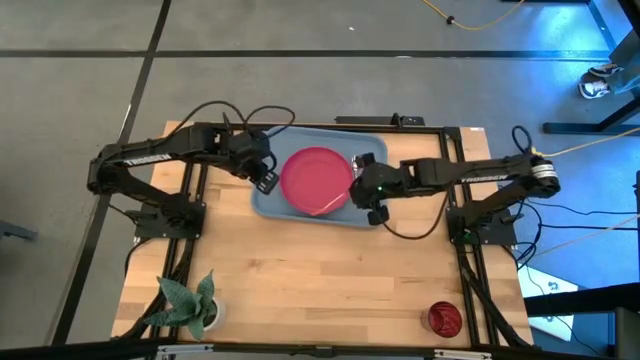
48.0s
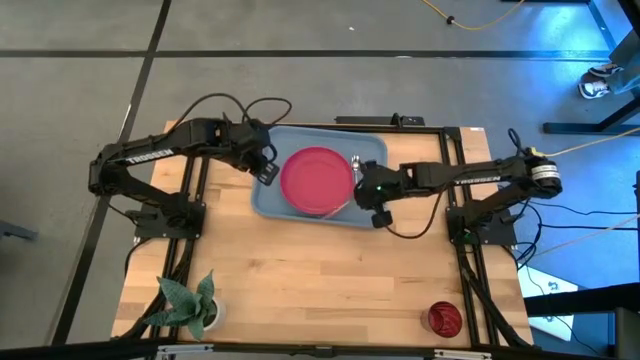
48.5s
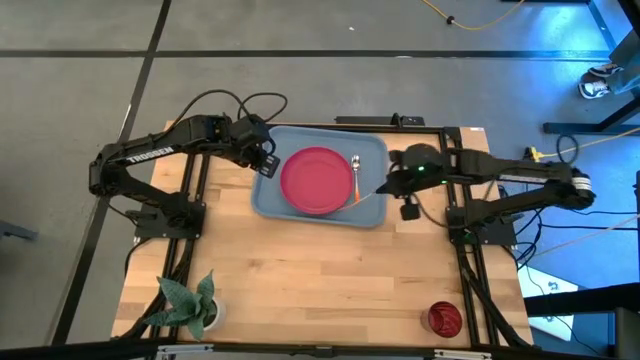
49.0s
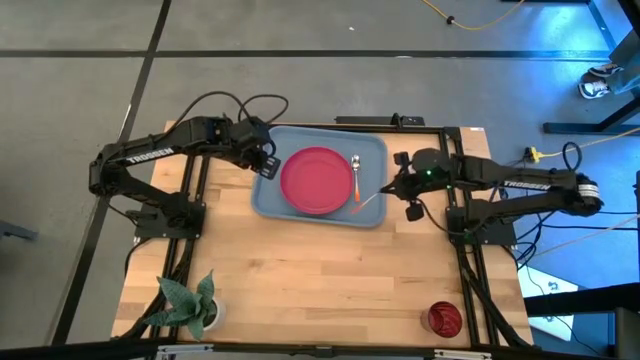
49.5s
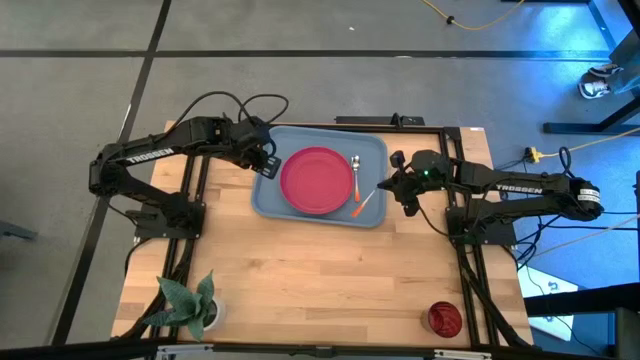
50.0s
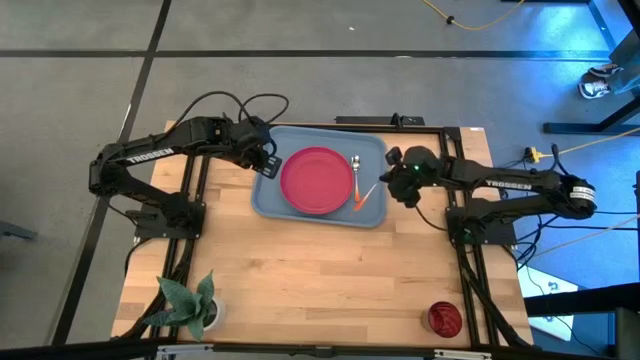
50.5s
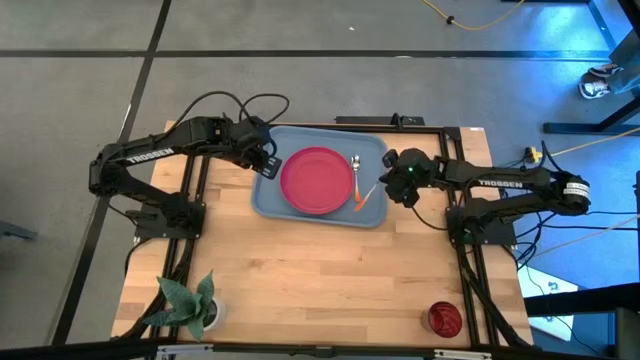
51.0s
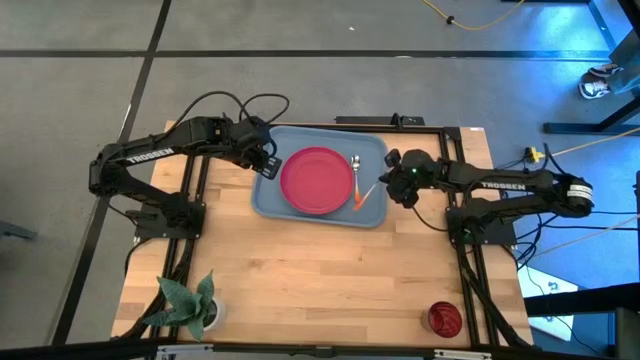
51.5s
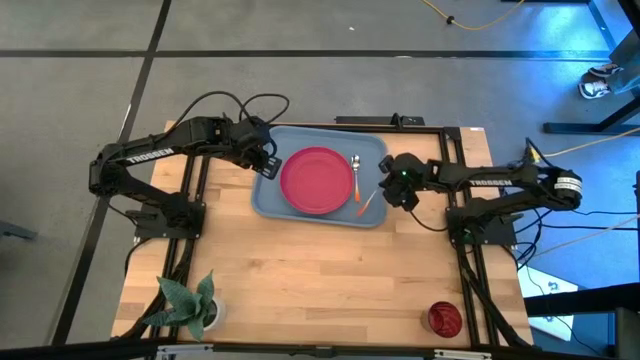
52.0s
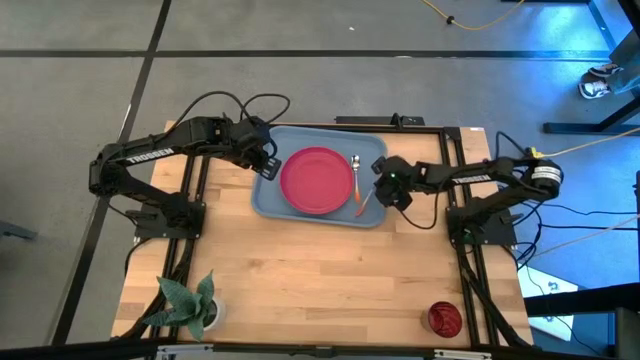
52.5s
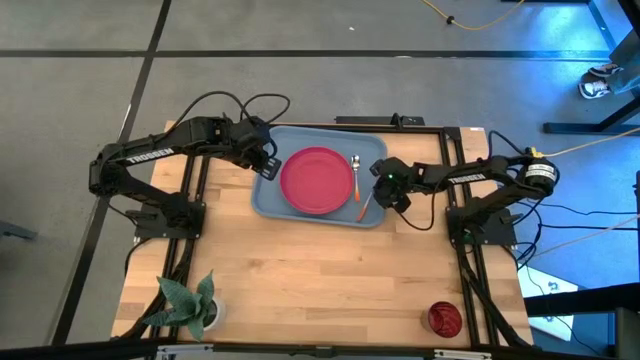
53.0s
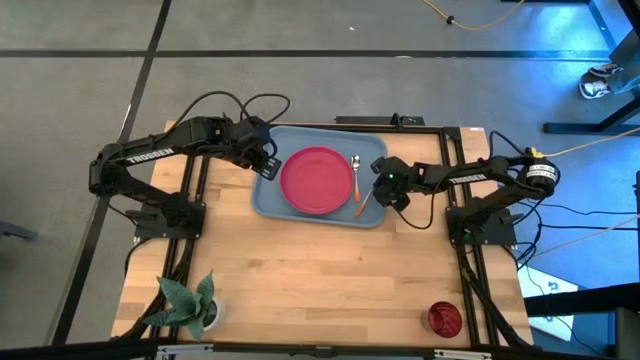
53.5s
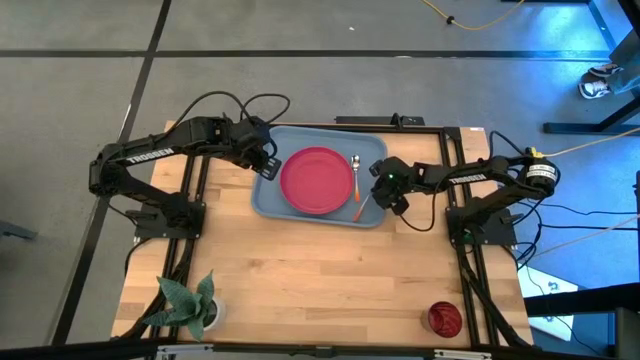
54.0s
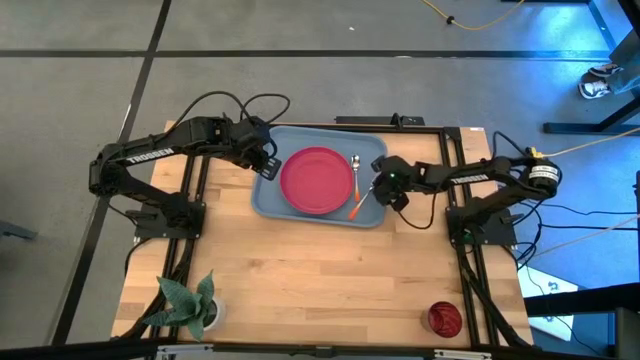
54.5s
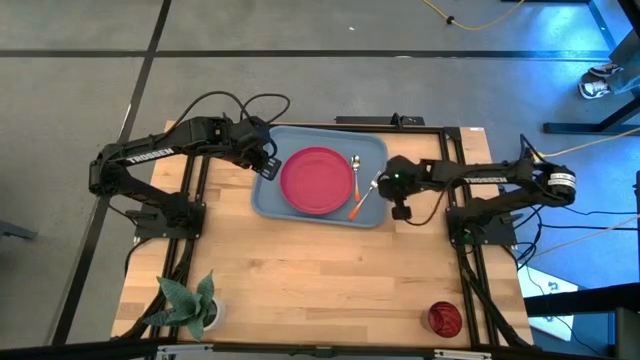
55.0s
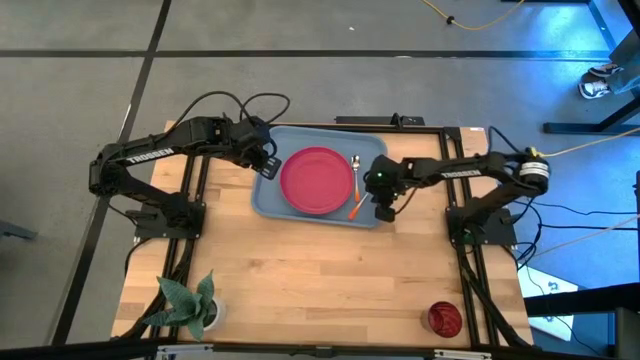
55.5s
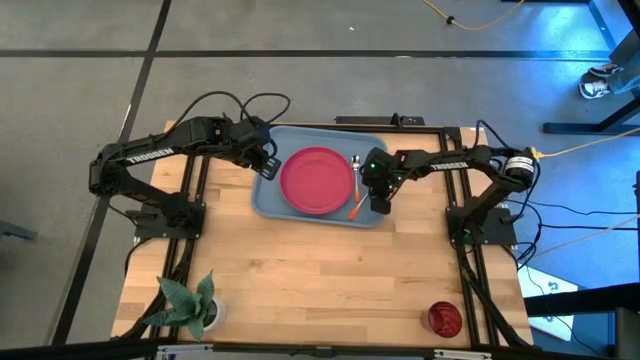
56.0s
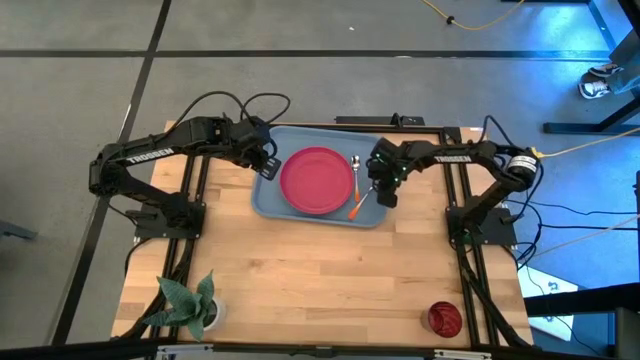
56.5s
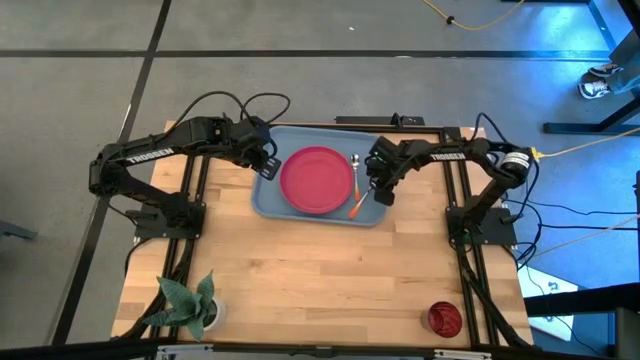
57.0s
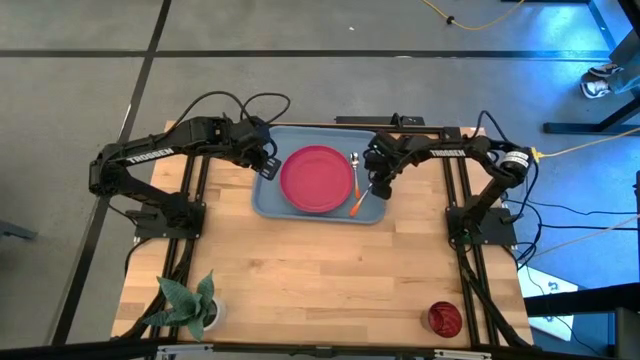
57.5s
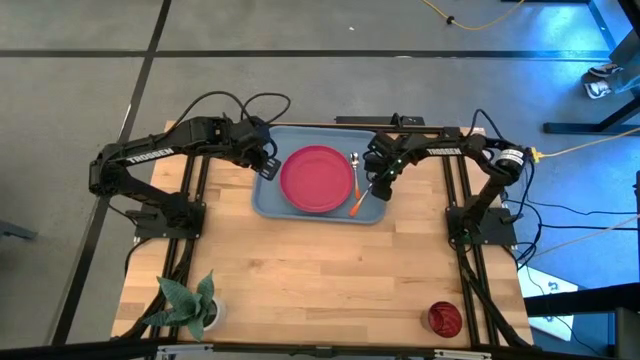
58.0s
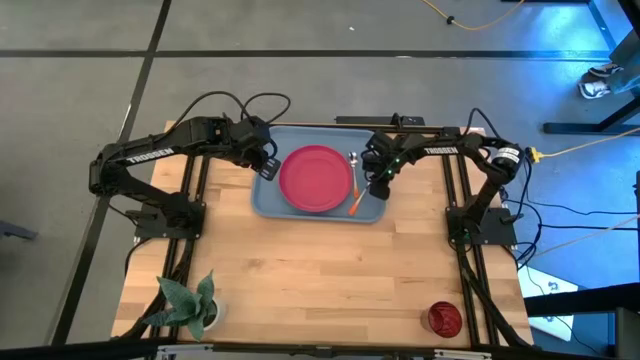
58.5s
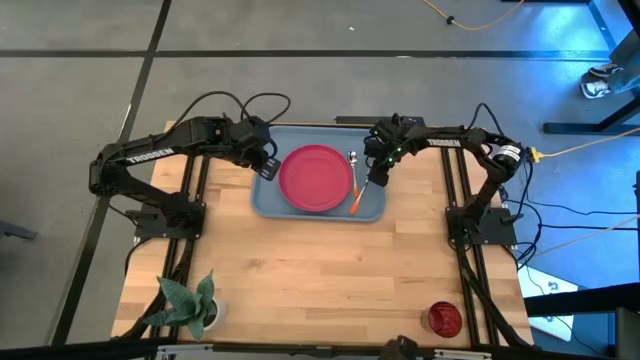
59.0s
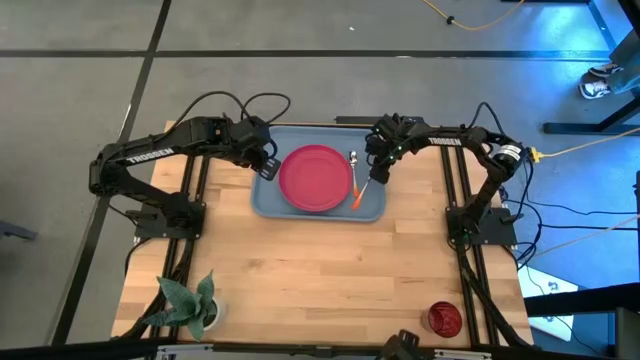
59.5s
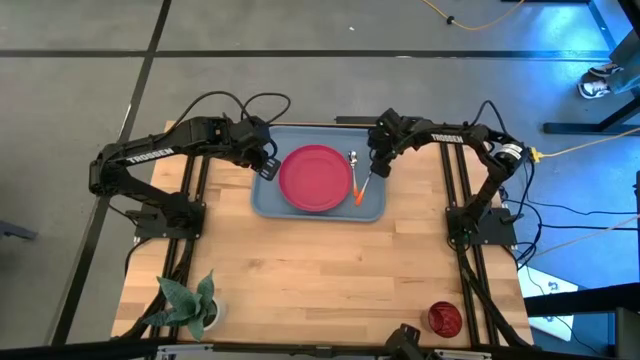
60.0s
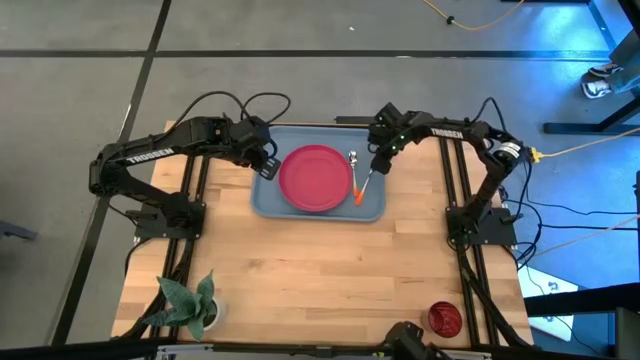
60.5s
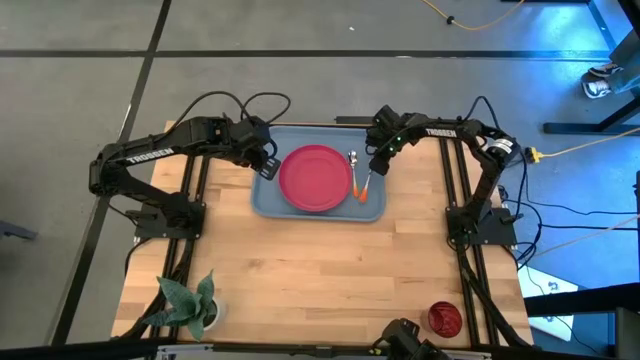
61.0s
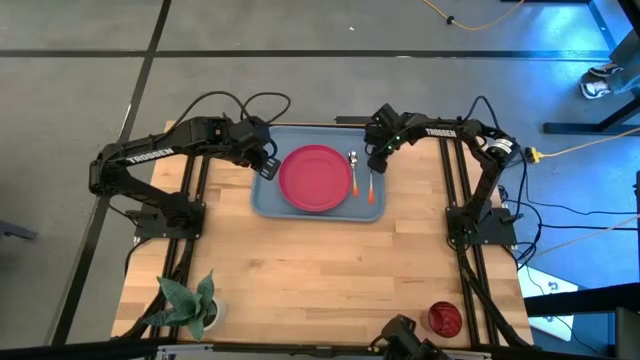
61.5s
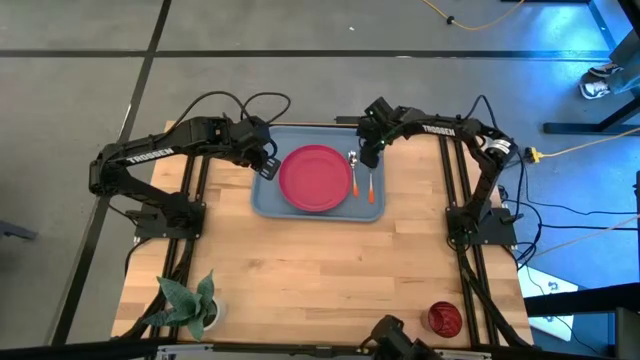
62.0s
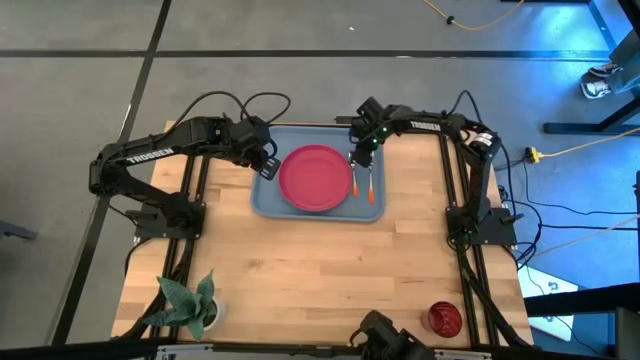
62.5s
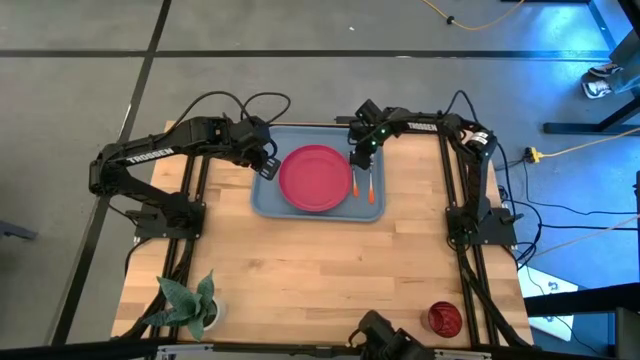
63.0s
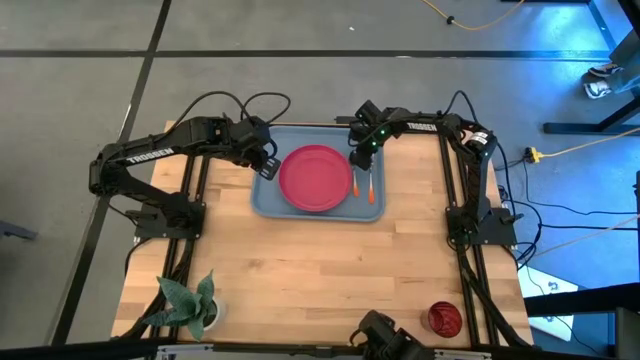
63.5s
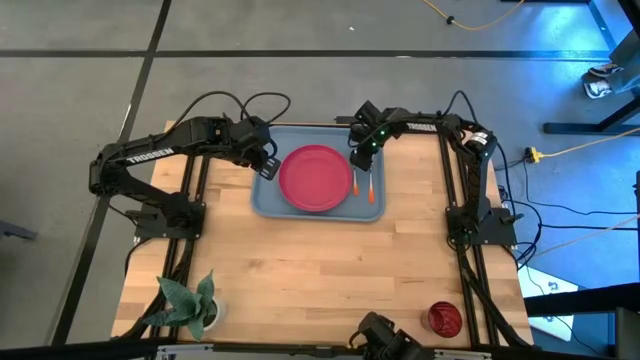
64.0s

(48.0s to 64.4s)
Task: Pick and place plate/cup/fork/spoon on tray
Put the orange fork on the blue serving tray at the right of the orange spoon

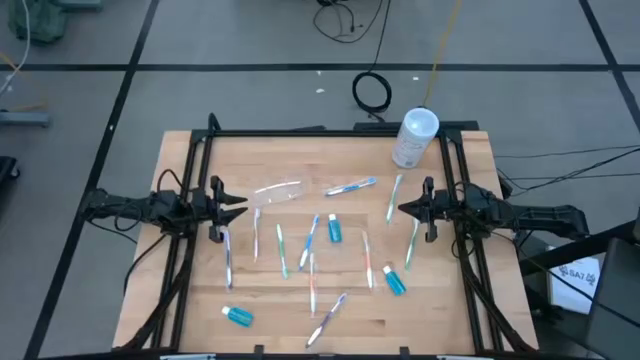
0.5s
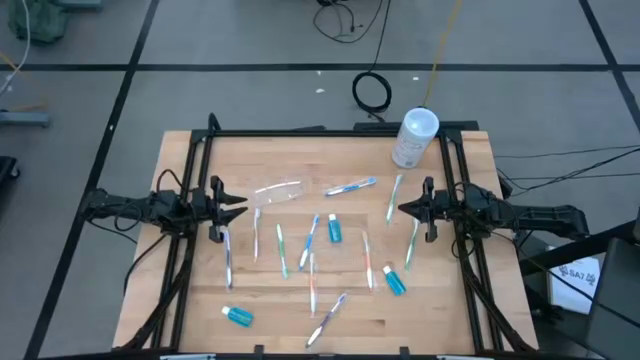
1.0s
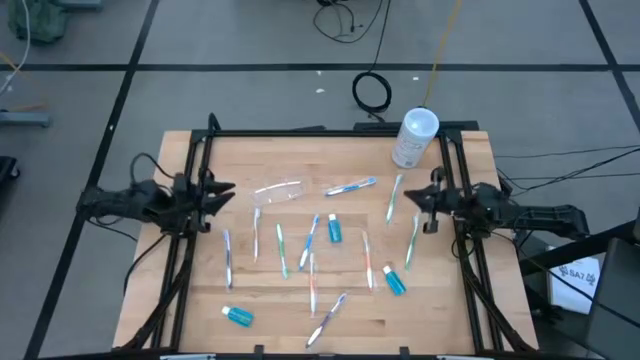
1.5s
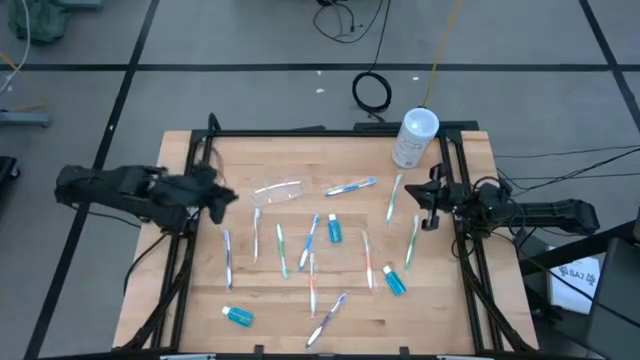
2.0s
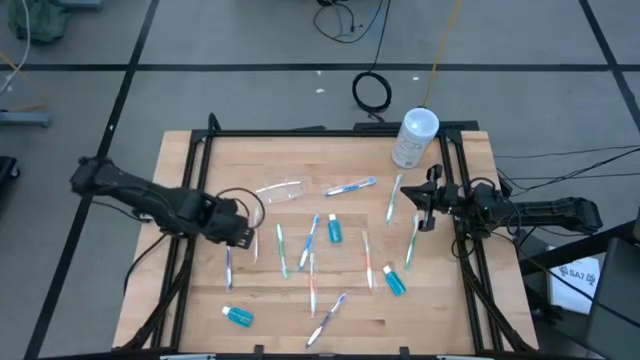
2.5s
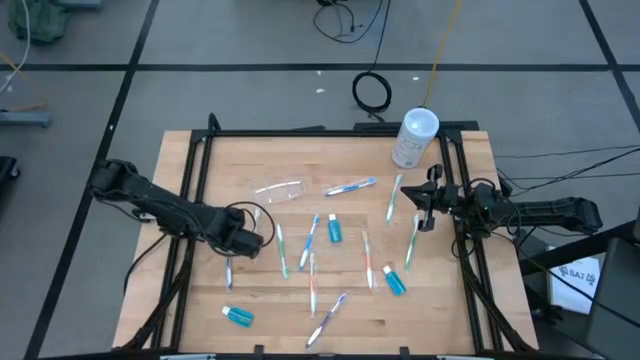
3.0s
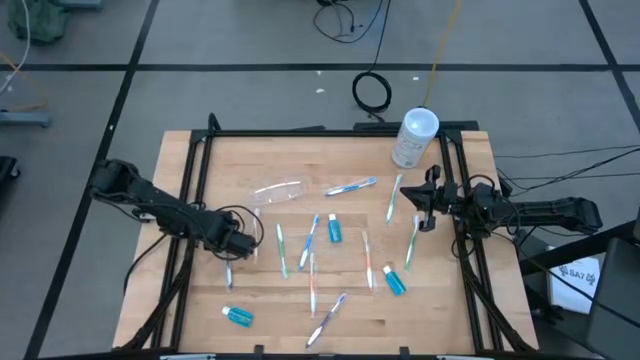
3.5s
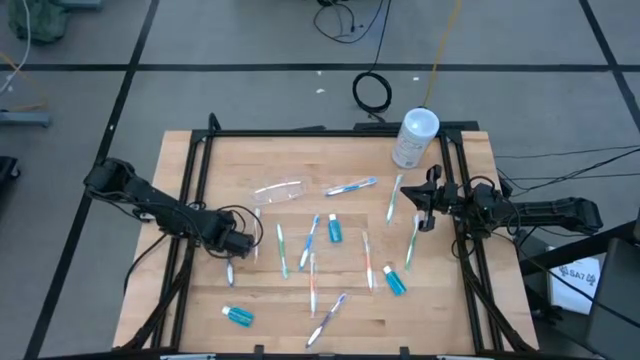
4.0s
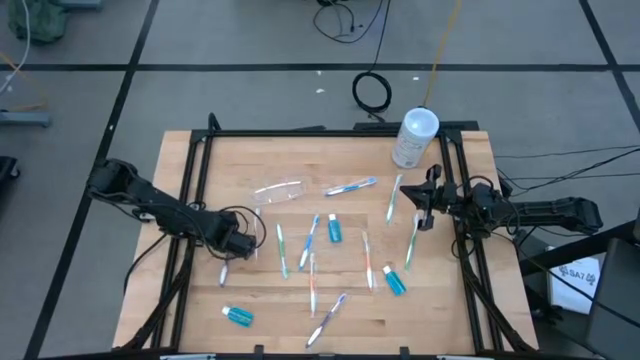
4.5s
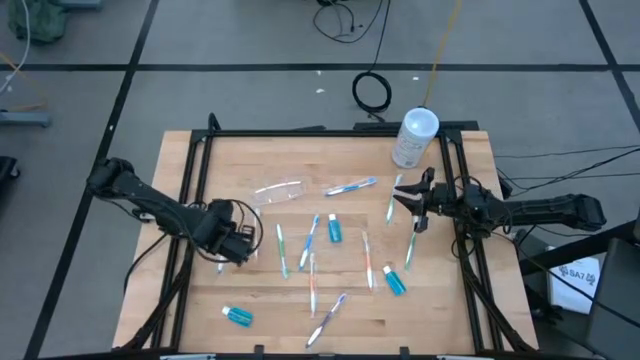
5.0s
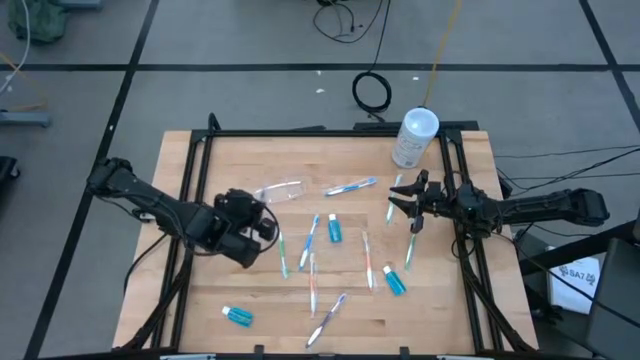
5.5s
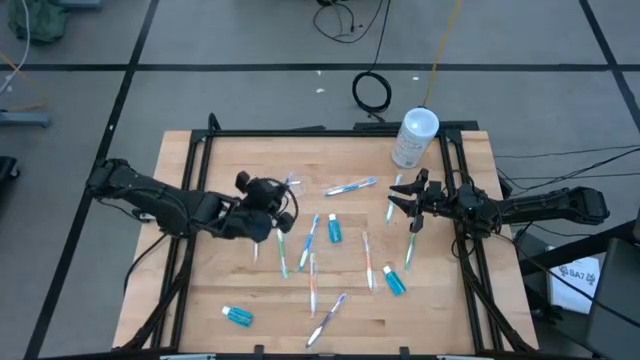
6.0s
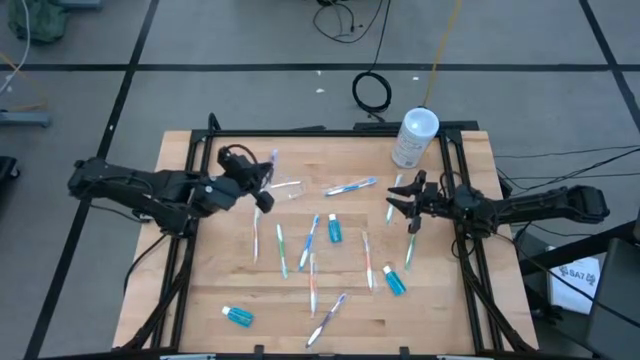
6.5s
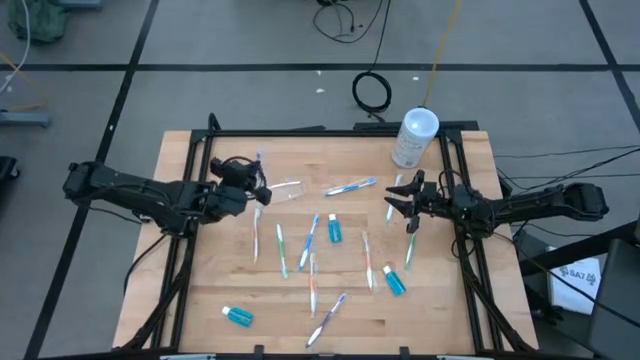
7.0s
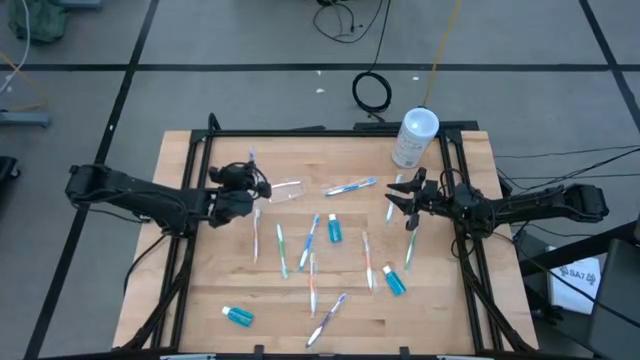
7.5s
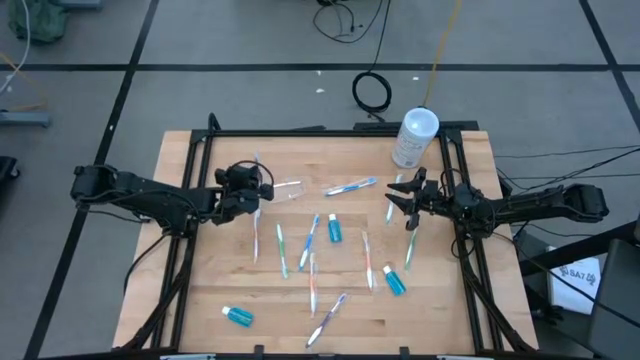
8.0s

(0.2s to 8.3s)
Task: Pick & Place toothbrushing station
Put the top purple toothbrush into the left compartment of the transparent organizer
